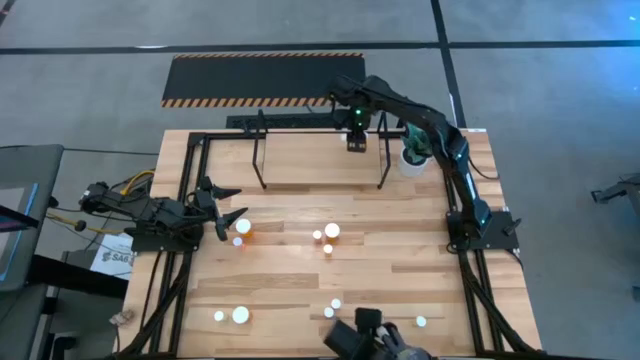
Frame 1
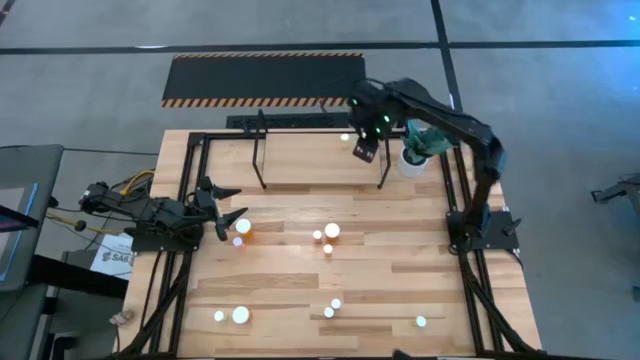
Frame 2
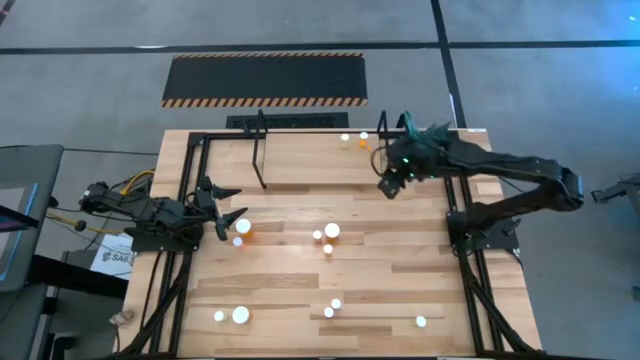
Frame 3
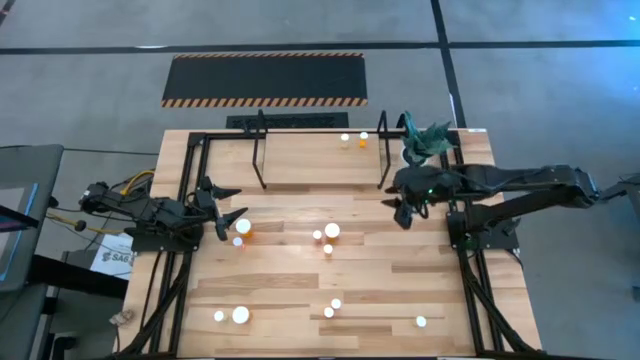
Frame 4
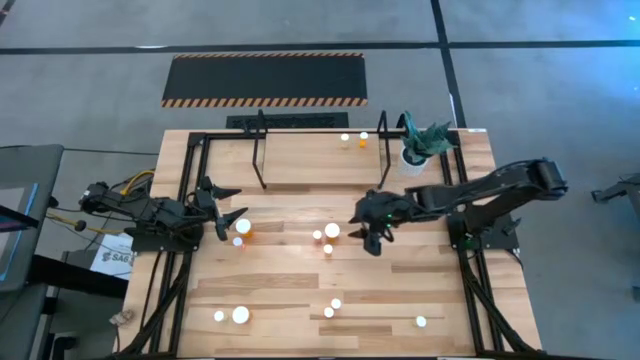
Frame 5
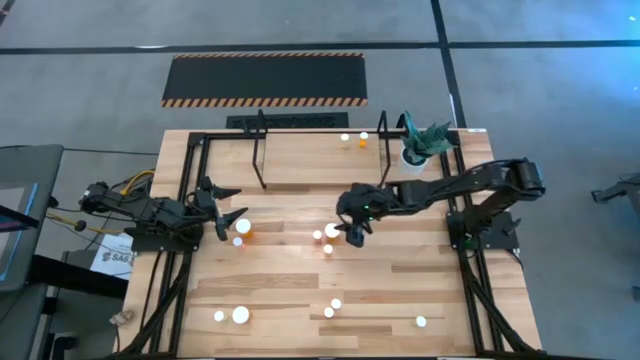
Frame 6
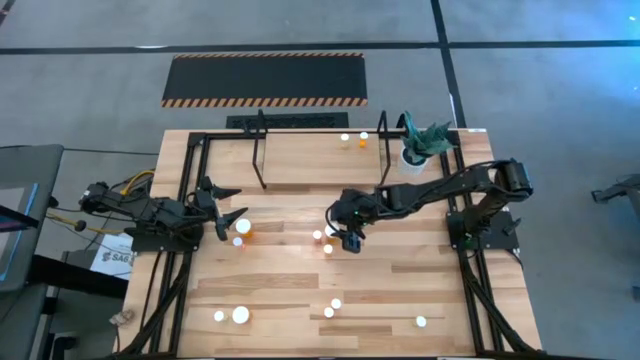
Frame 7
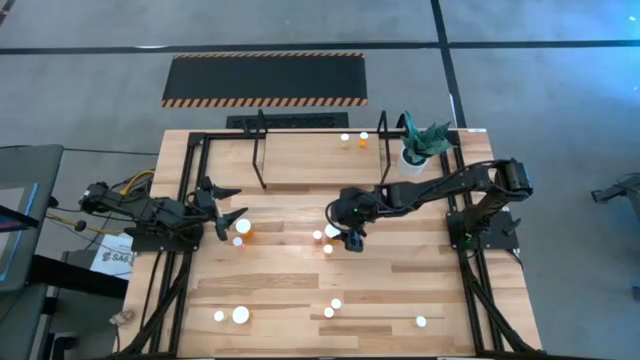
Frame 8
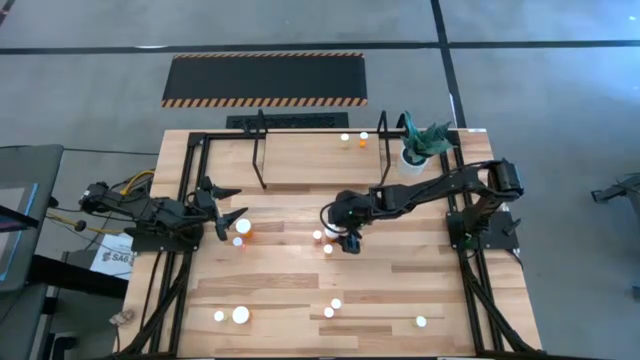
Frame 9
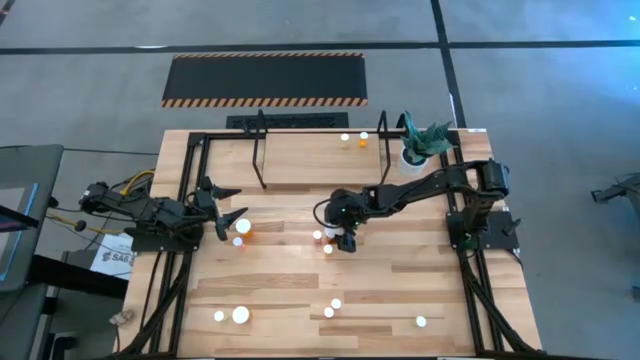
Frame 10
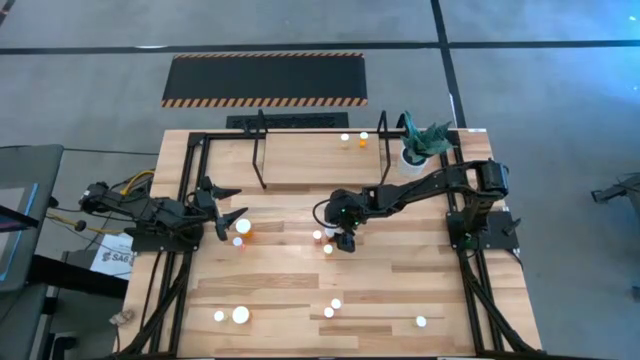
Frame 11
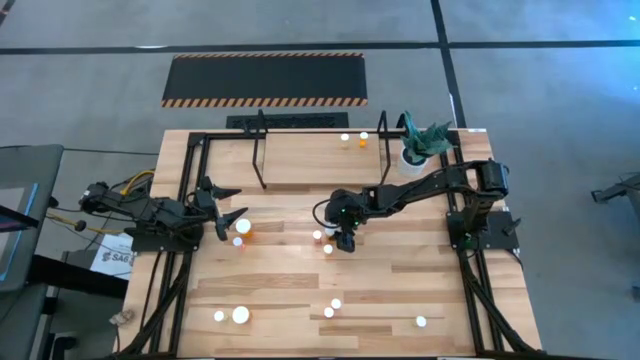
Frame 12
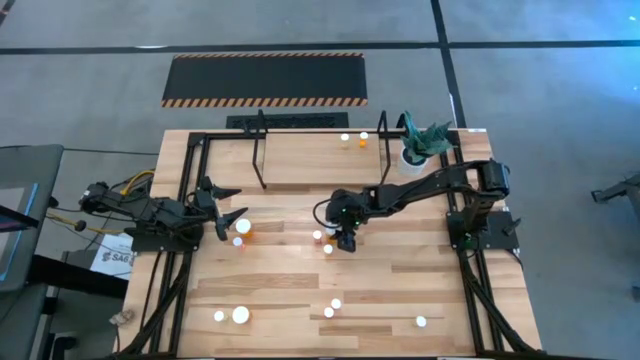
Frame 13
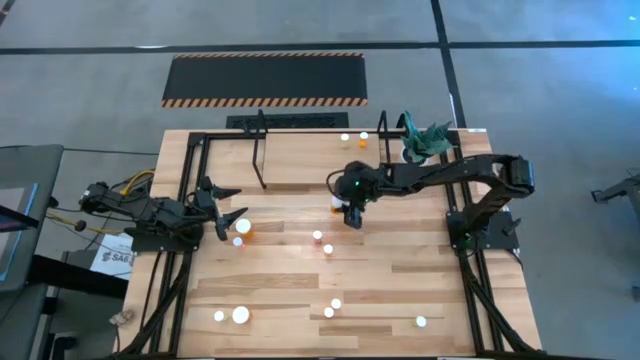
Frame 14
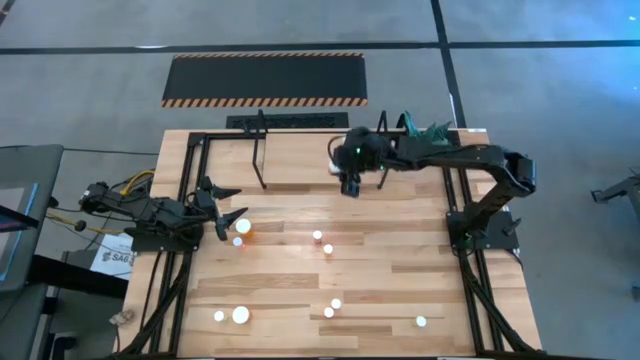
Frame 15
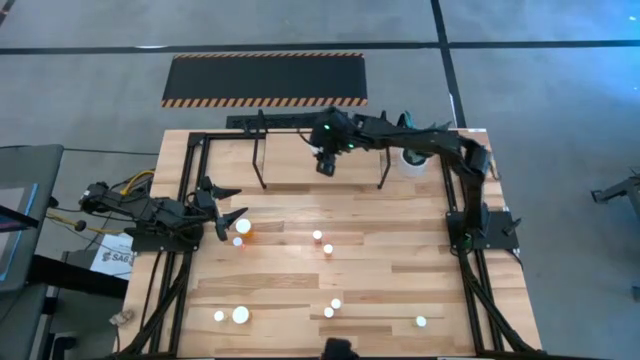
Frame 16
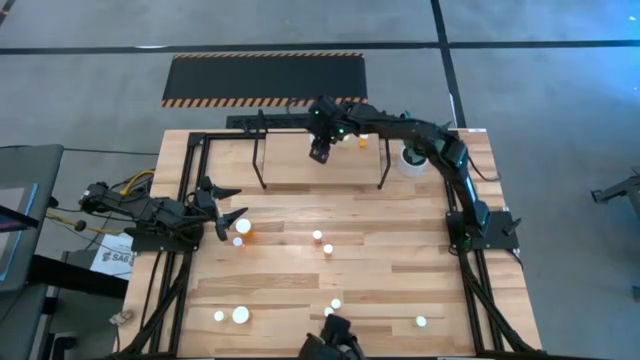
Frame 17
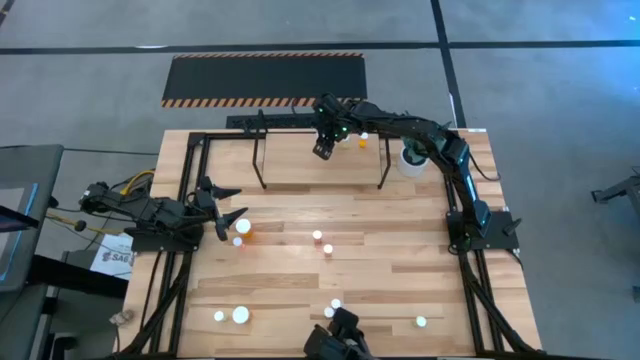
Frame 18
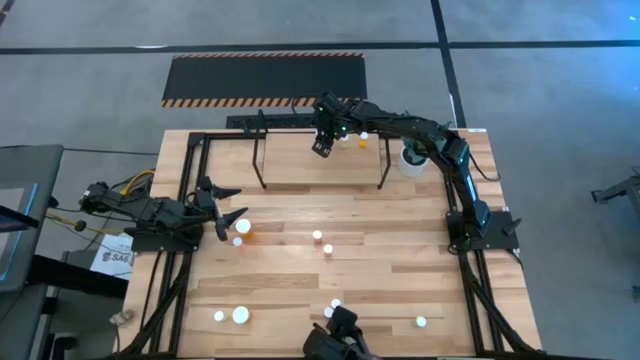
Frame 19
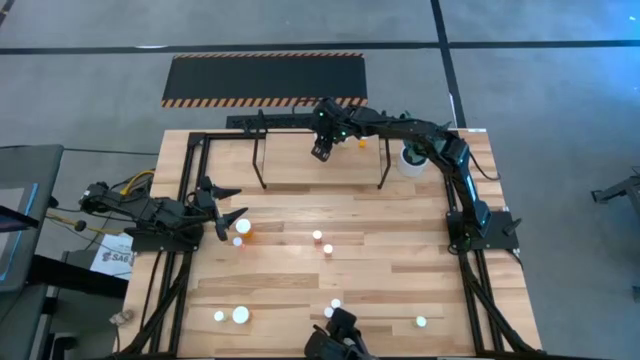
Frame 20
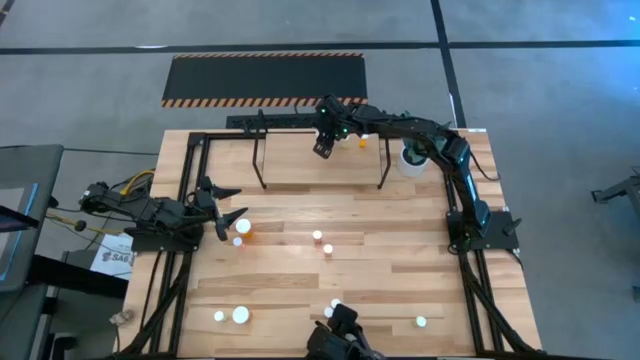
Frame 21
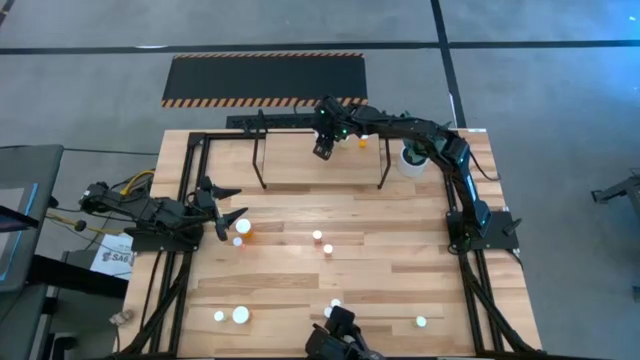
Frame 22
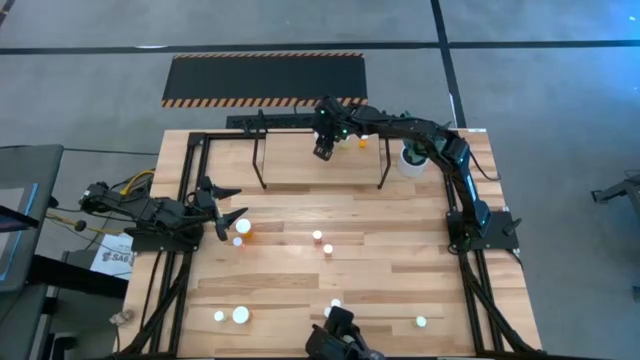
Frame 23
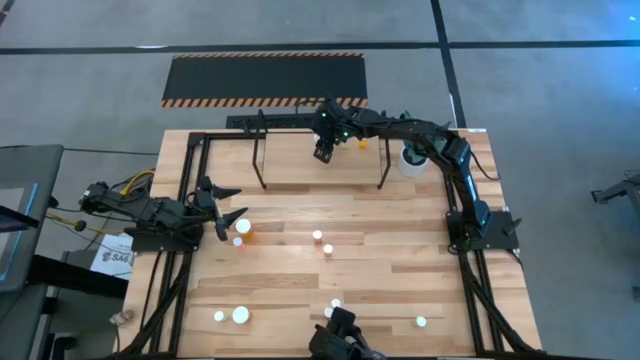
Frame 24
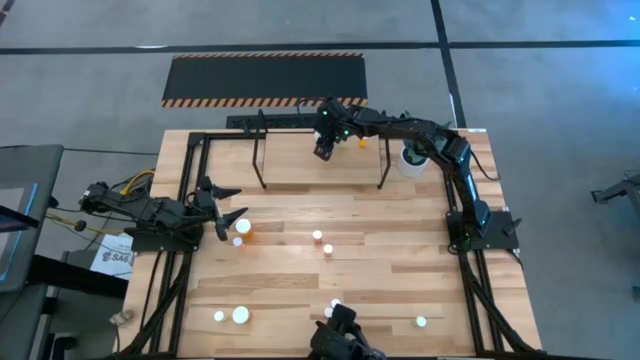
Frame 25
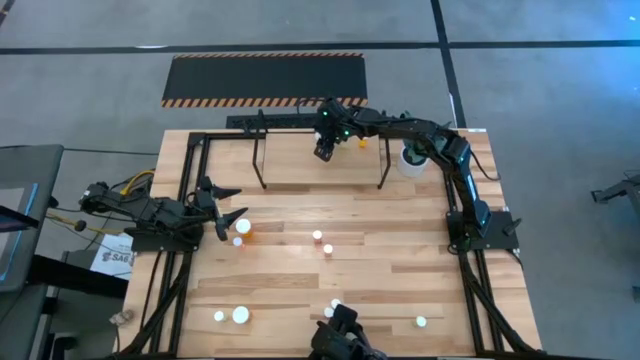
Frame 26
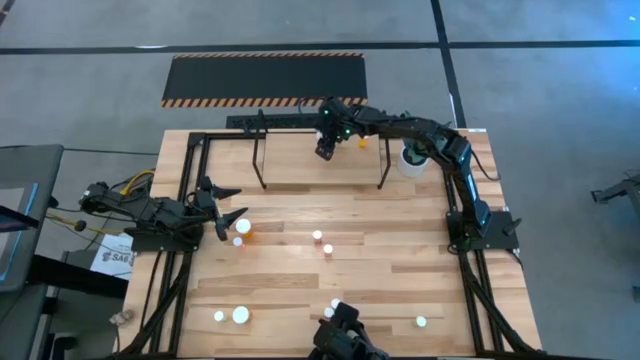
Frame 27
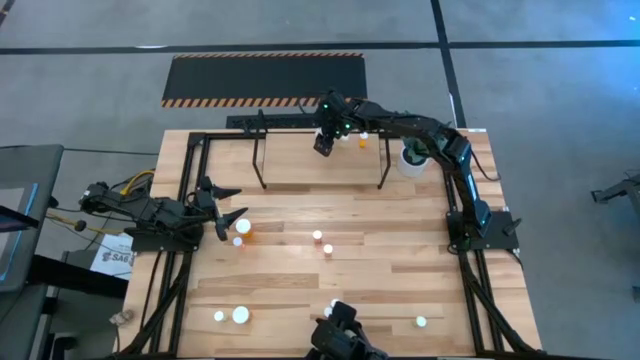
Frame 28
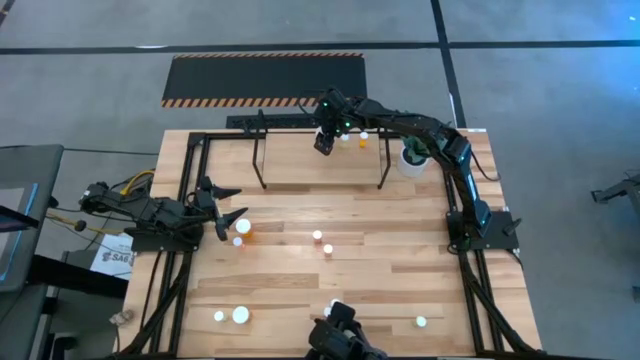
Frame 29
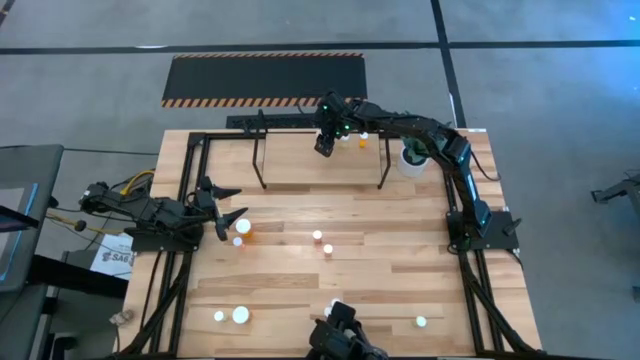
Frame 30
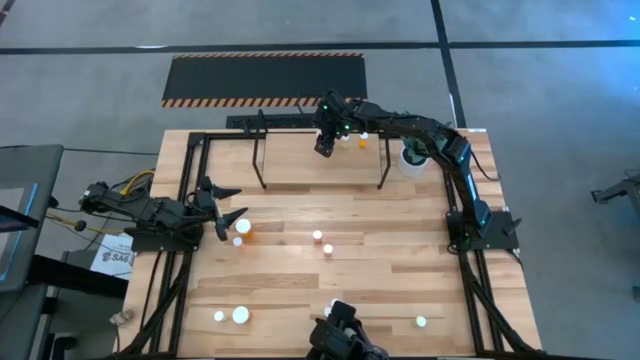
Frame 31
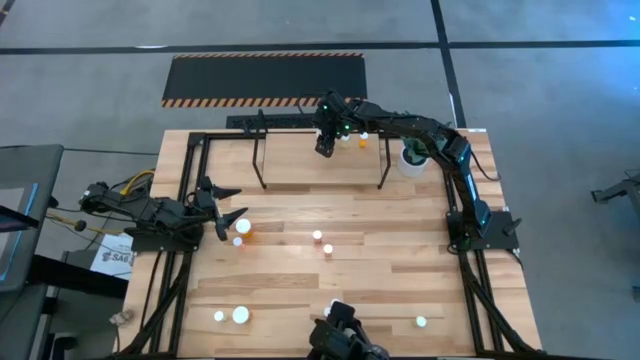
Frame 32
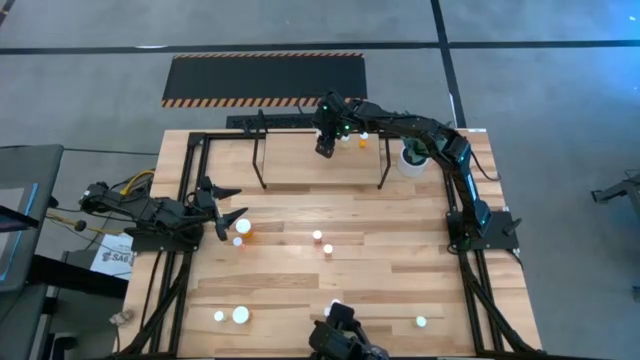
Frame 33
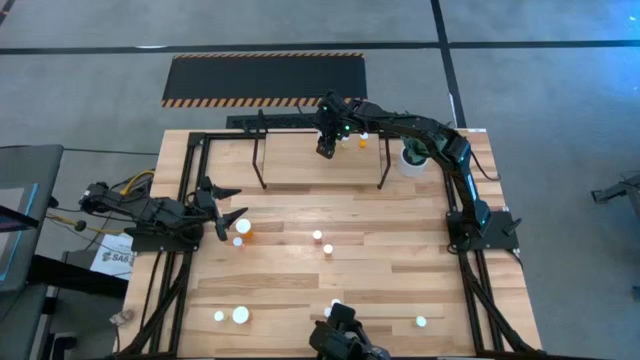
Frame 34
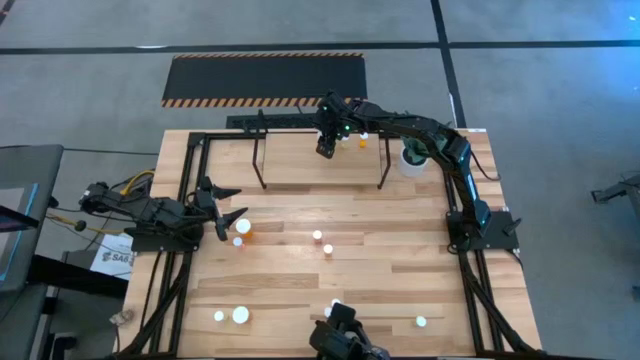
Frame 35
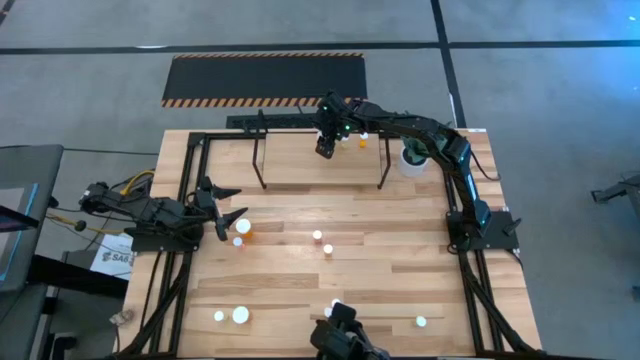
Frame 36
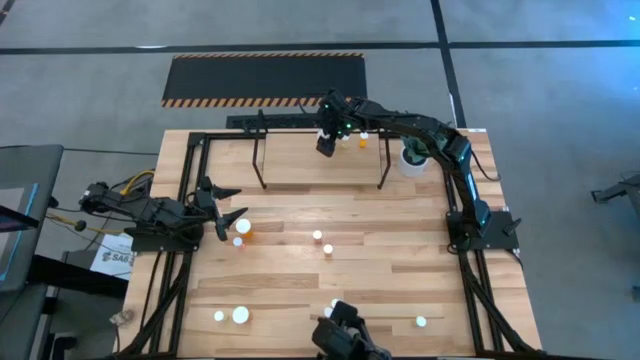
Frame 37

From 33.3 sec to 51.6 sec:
Task: Pick and place medicine bottles onto shelf by color
Put the top right large orange pill bottle on the shelf

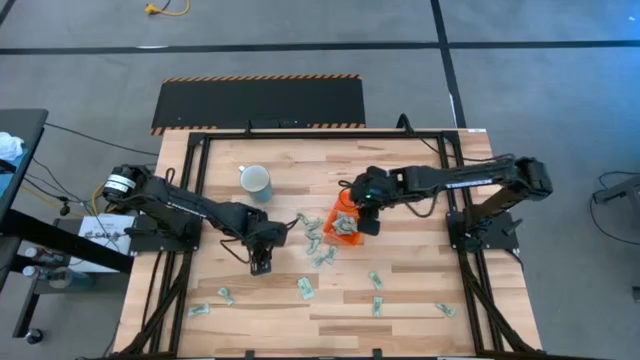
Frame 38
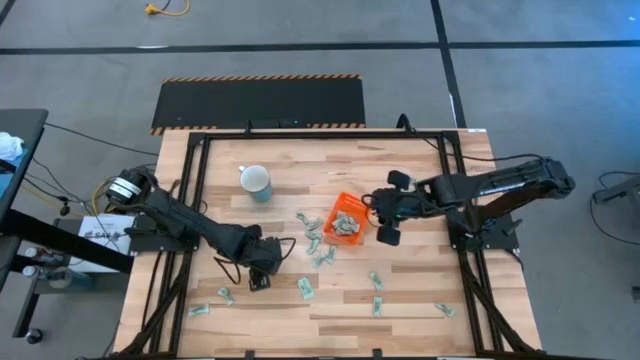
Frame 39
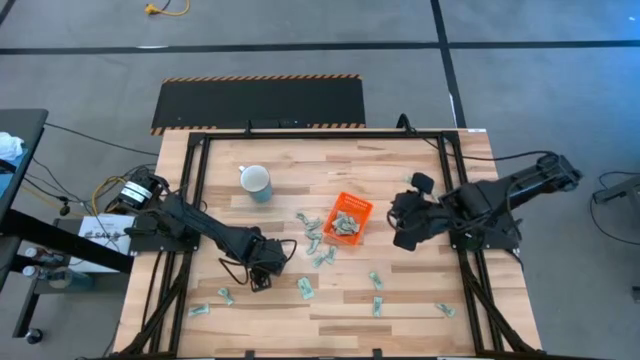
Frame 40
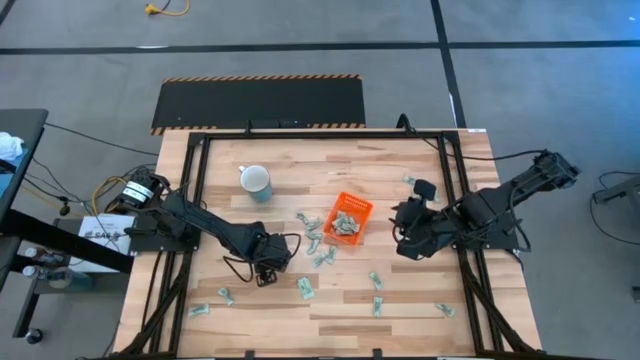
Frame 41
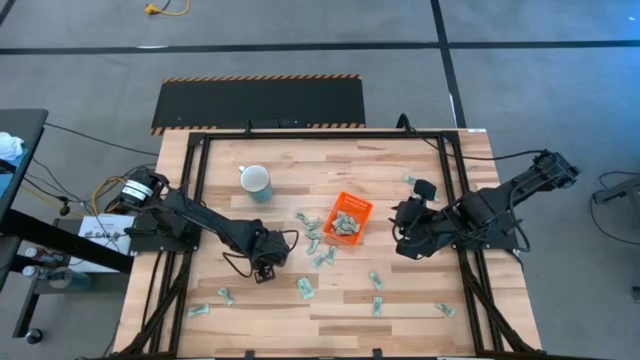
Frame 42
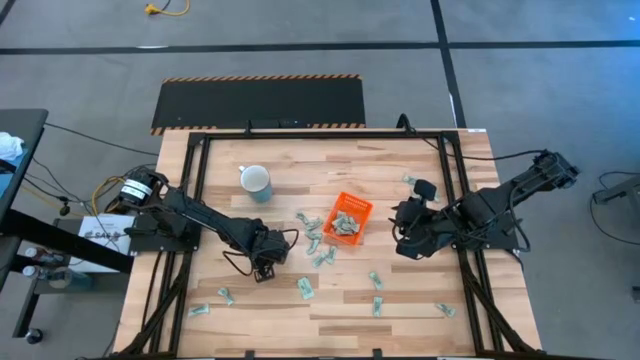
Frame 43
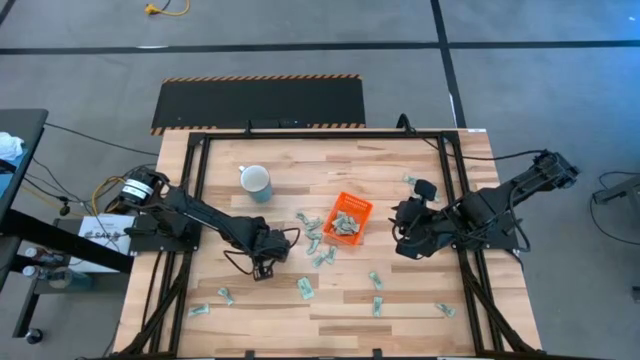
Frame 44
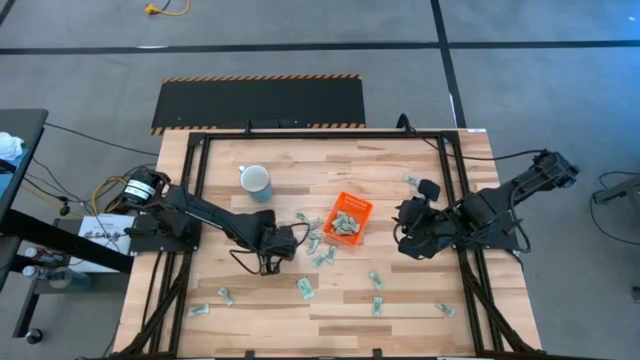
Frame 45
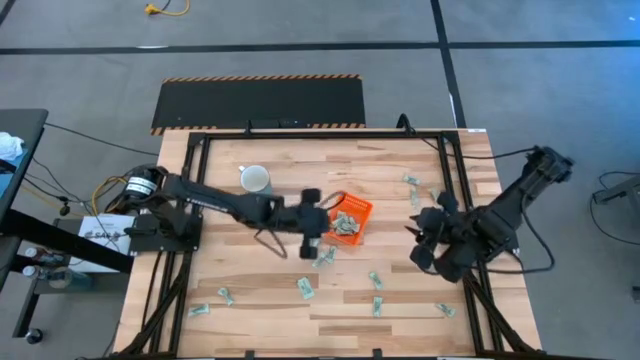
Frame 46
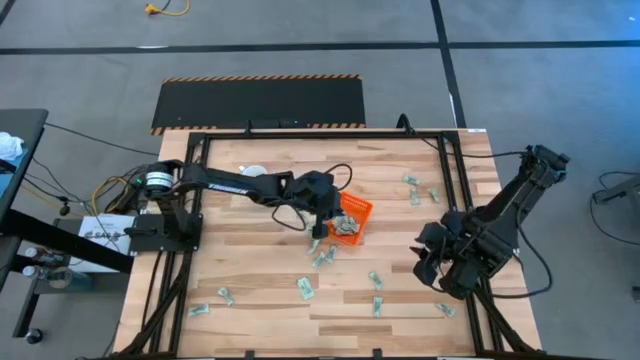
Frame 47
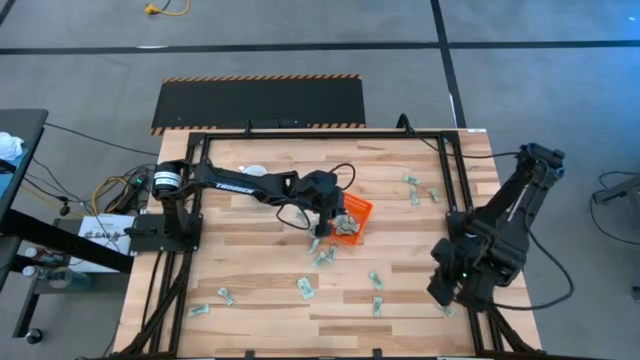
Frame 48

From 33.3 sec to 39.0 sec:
Task: Pick and place Stevia / Truvia into bins
Put the stevia packet into the basket
